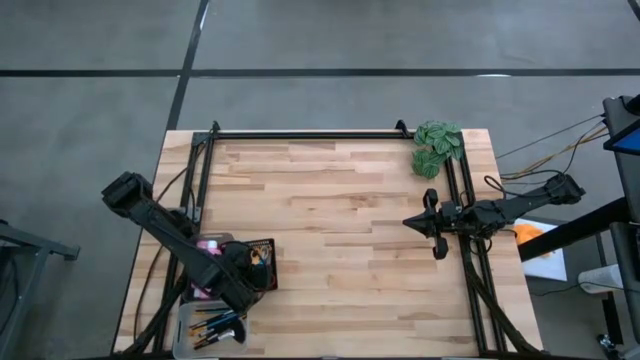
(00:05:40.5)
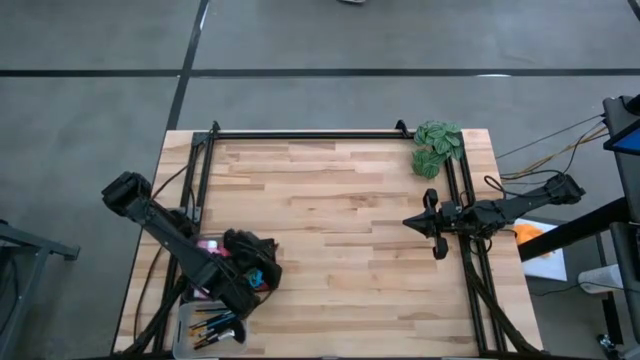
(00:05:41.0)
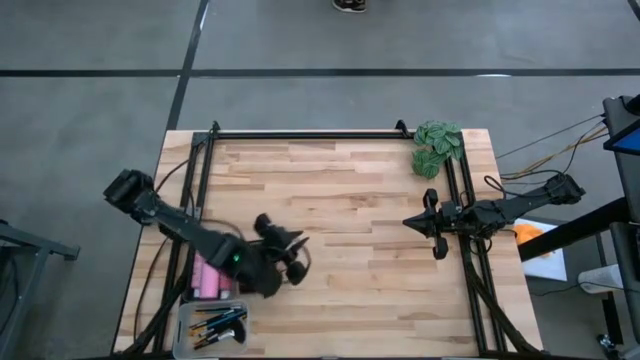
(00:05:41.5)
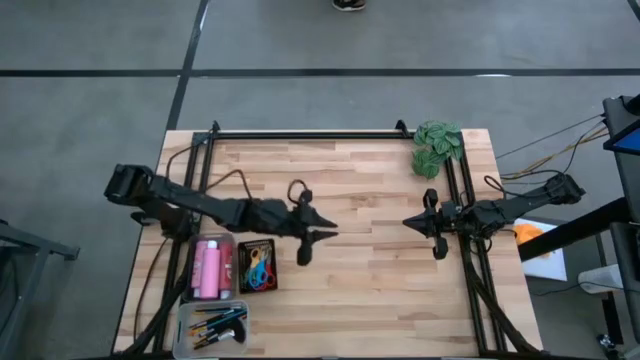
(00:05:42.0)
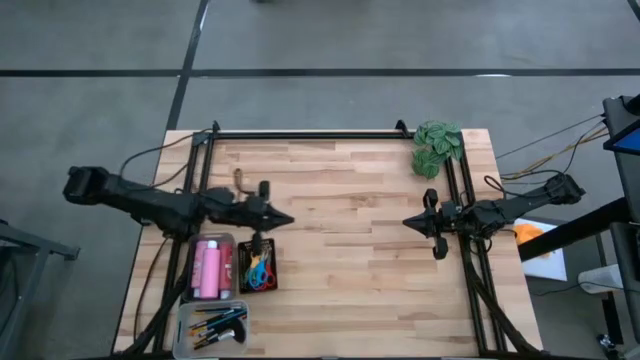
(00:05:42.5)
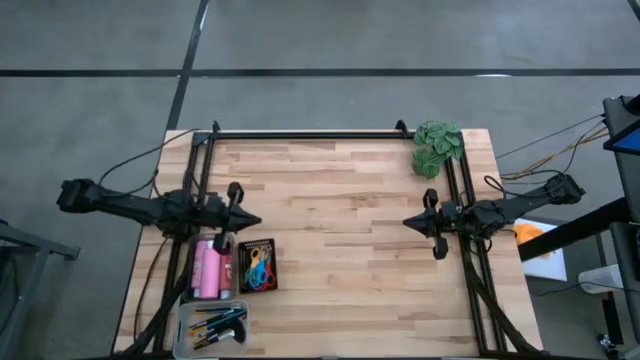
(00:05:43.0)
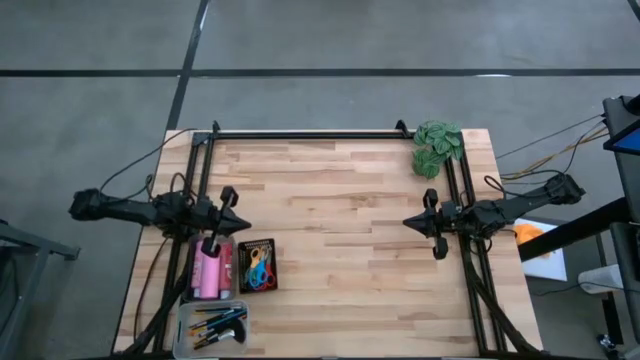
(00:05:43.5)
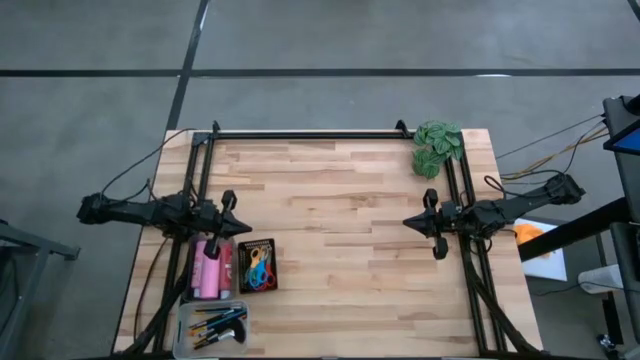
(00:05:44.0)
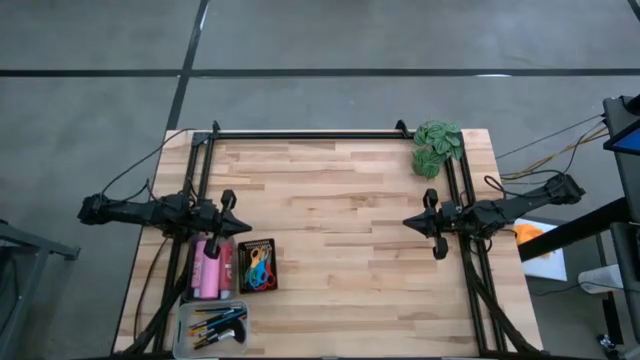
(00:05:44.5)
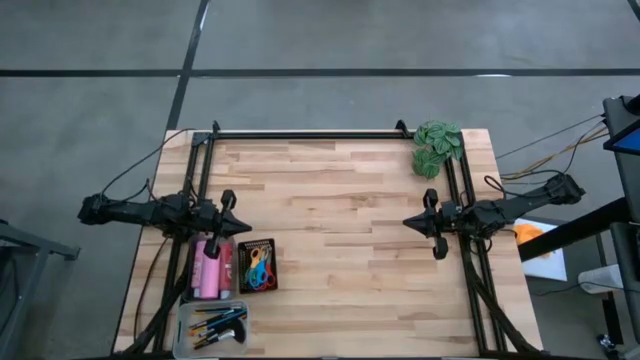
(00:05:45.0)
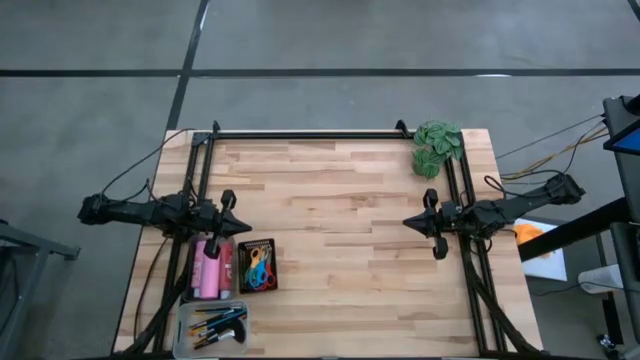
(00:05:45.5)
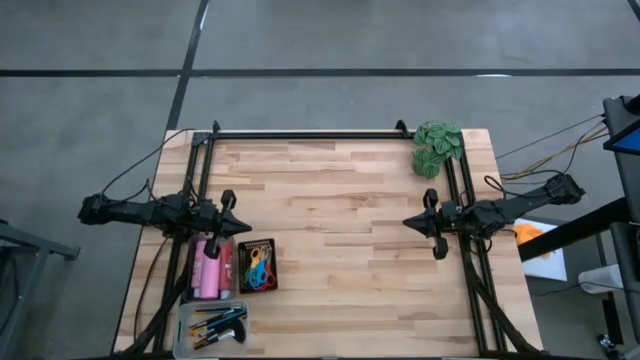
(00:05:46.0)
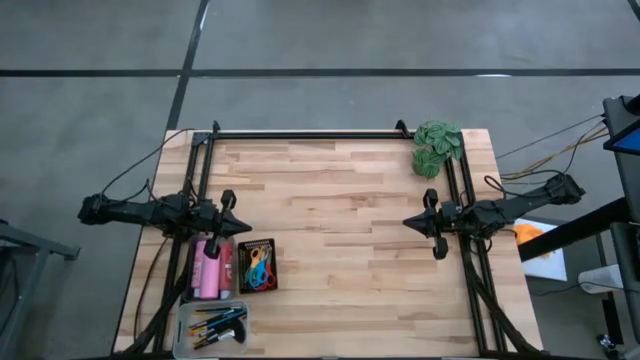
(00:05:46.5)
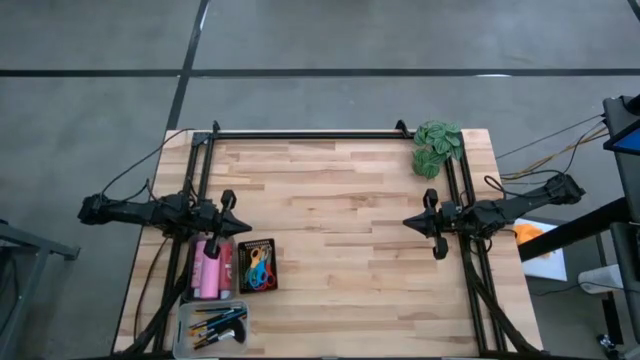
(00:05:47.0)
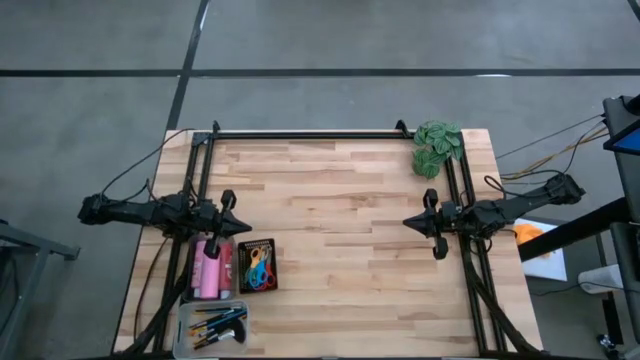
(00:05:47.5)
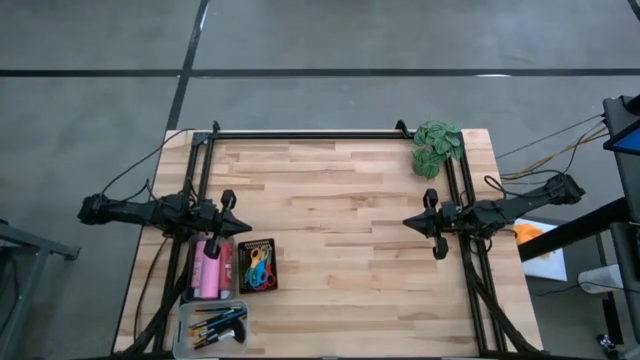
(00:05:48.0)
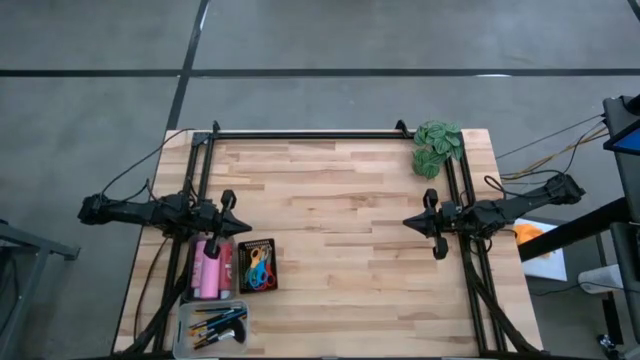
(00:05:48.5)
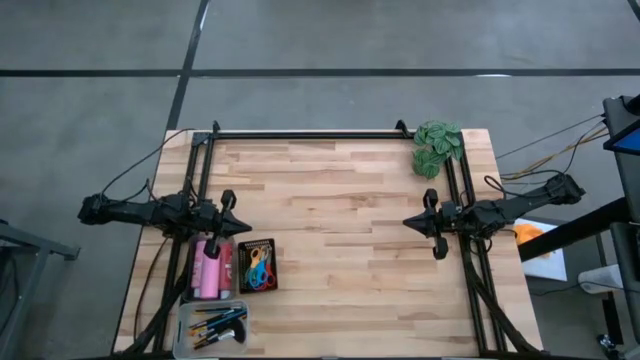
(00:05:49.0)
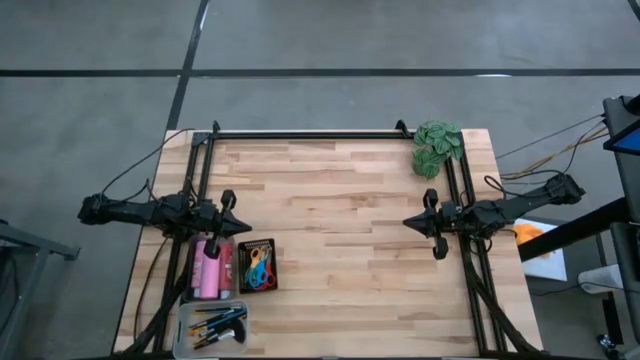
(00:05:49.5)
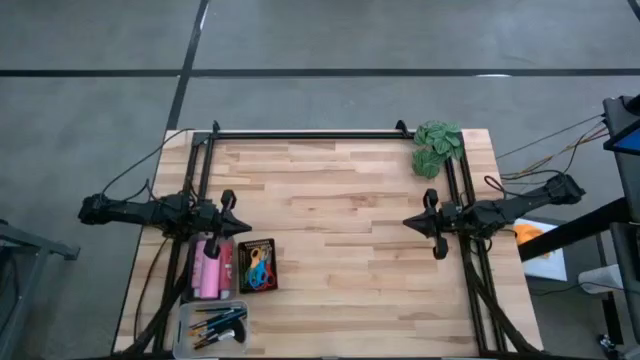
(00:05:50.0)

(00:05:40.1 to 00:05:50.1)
Task: Pick & Place Paint Supplies
Return to Home Position

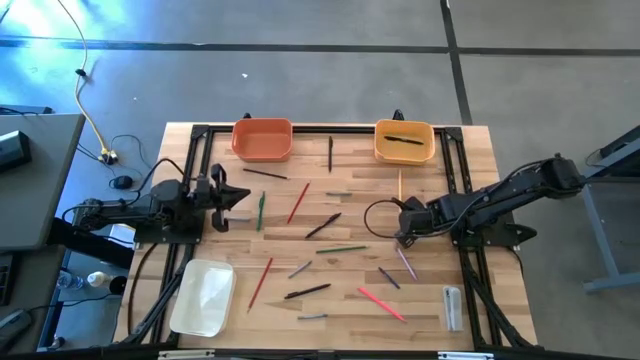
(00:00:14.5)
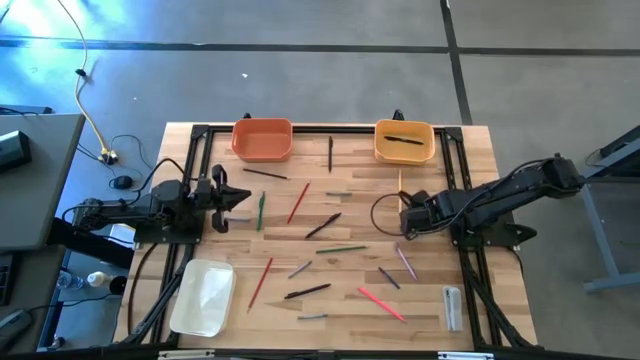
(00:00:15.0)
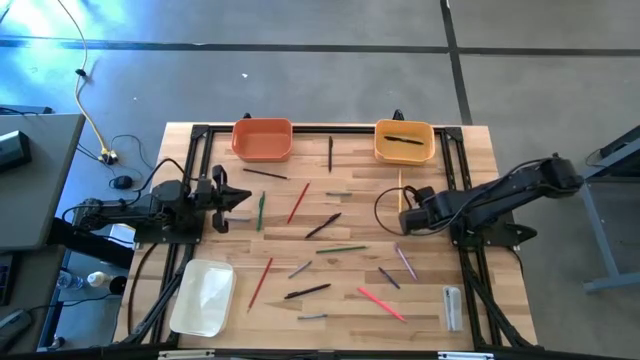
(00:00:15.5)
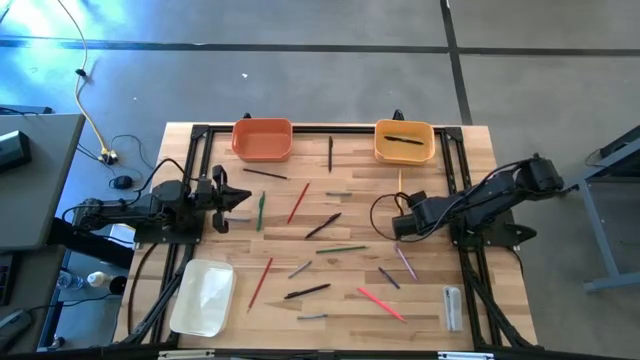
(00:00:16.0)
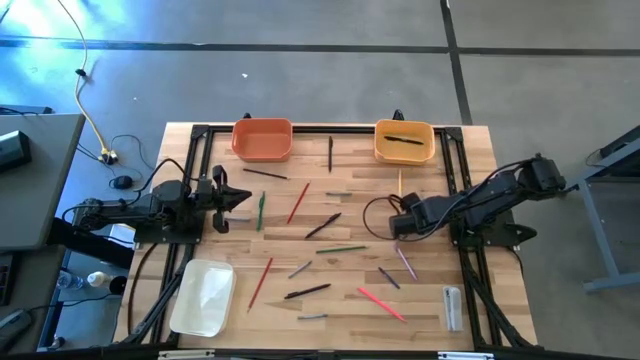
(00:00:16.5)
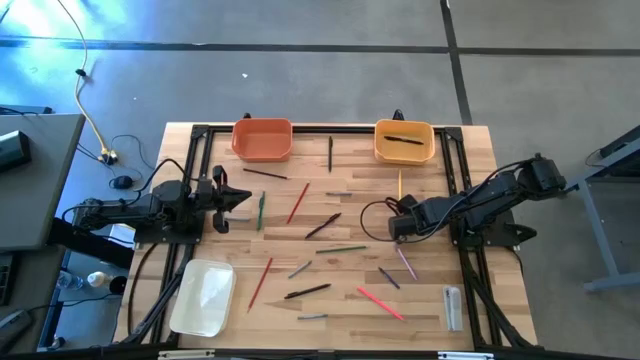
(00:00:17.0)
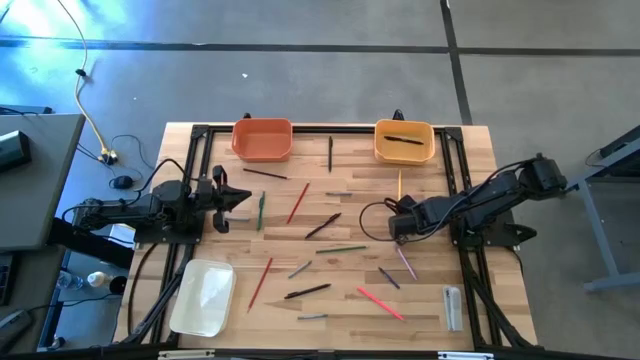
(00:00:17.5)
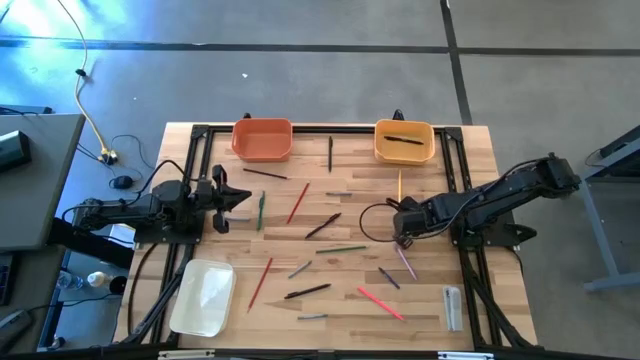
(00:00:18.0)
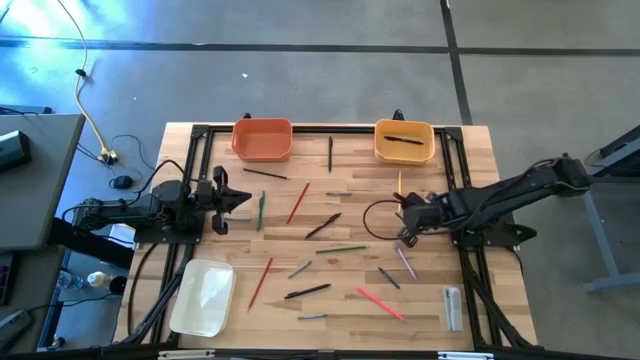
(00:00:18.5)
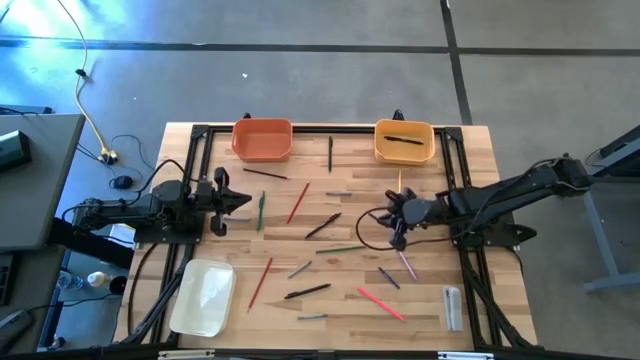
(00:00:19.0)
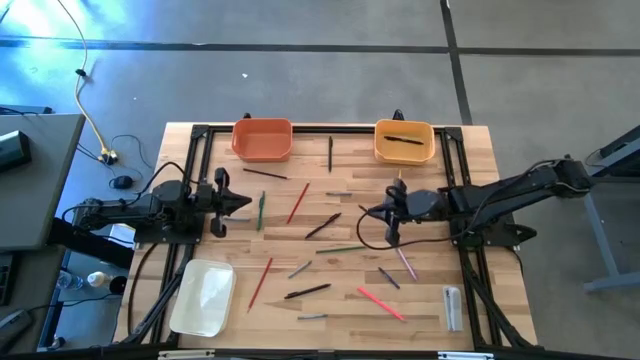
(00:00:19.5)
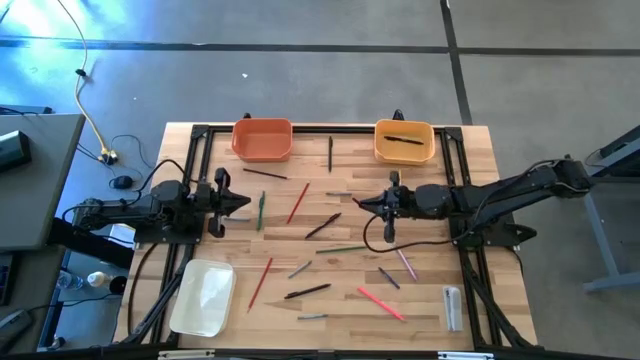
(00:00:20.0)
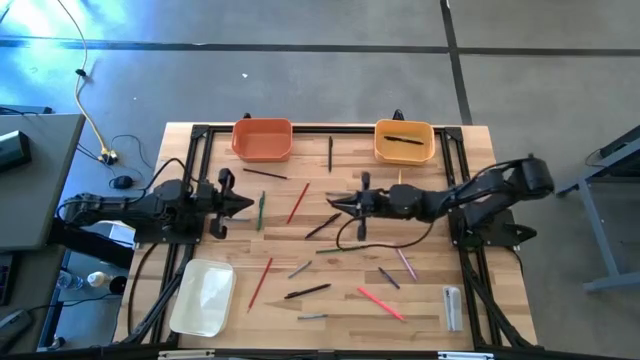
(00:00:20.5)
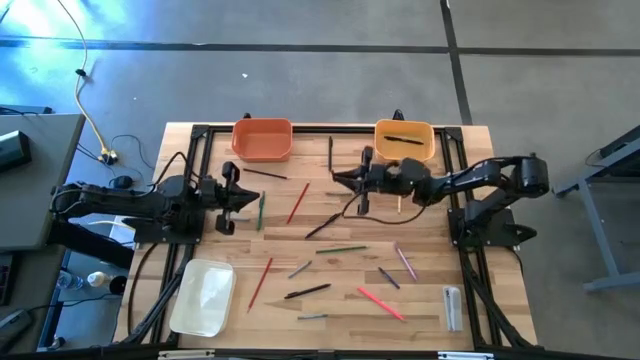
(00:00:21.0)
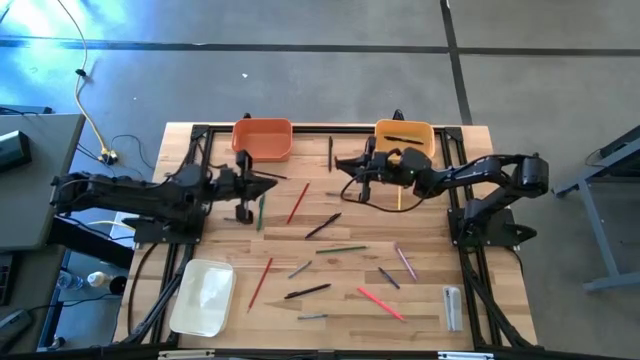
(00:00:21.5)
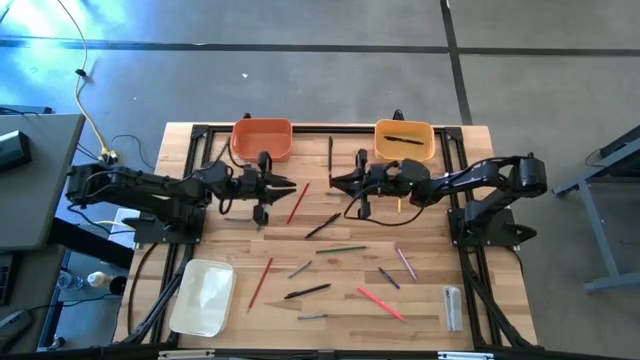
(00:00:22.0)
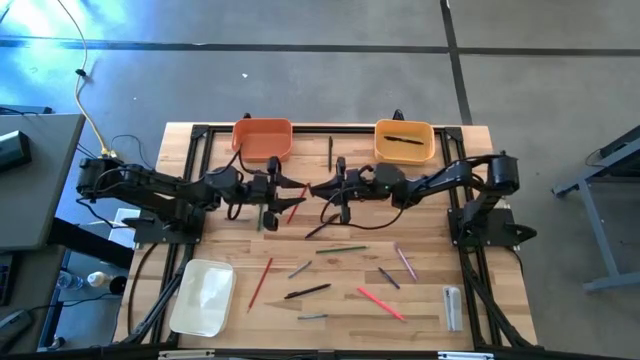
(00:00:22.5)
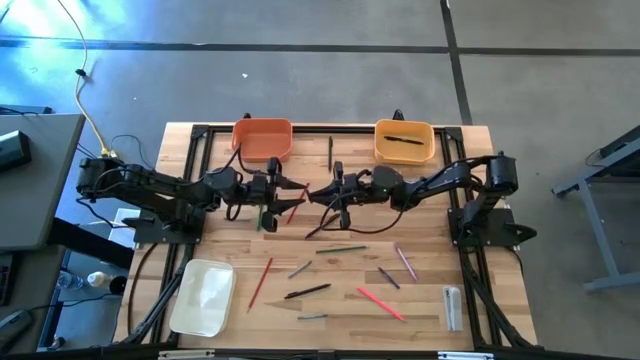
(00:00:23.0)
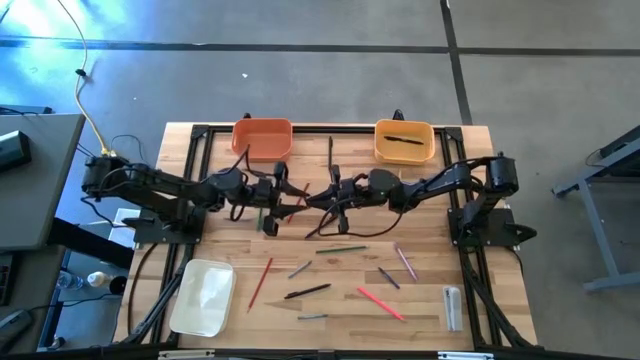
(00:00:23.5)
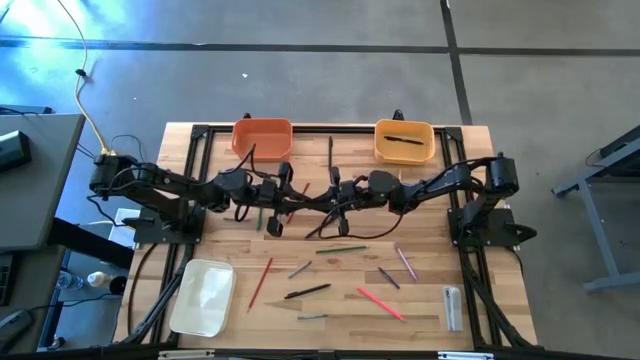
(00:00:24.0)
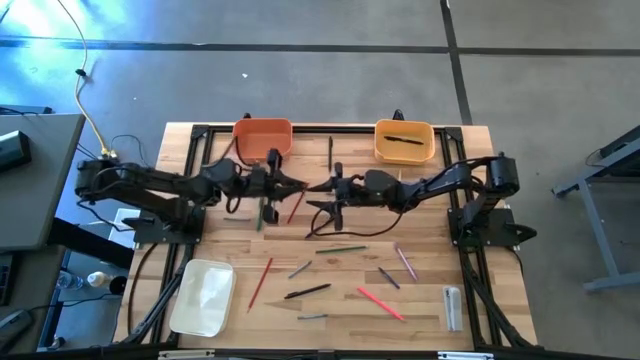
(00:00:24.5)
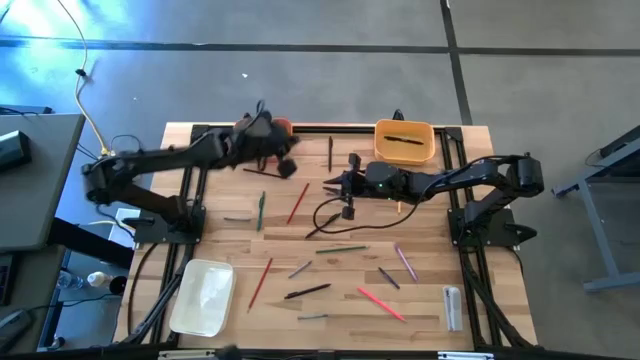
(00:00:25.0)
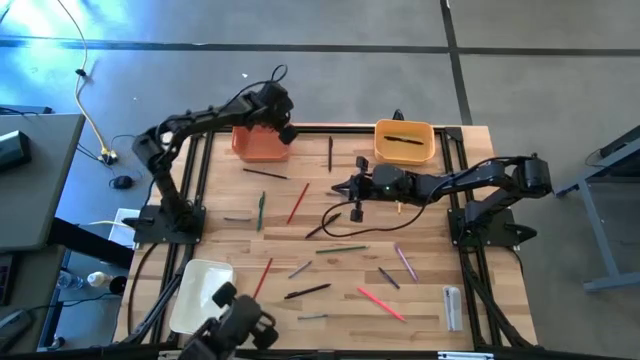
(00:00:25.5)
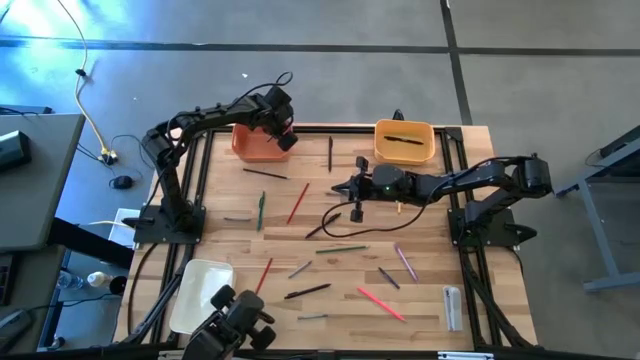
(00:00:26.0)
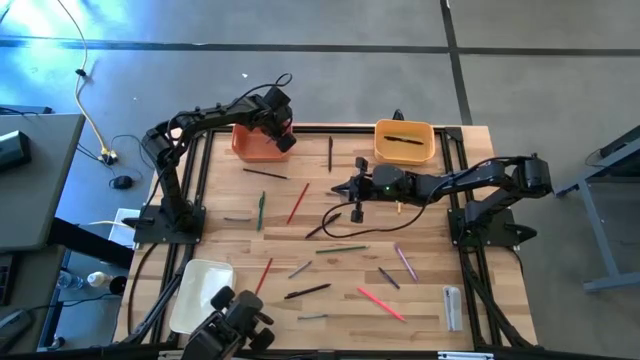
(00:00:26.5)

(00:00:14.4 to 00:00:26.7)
Task: Sort crayons/erasers/pens/pencils in bins
Put the blue crayon into the orange bin
